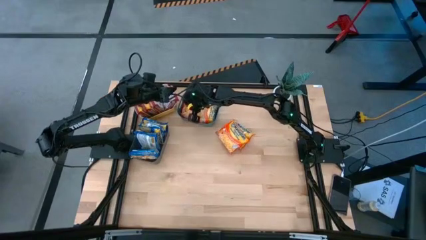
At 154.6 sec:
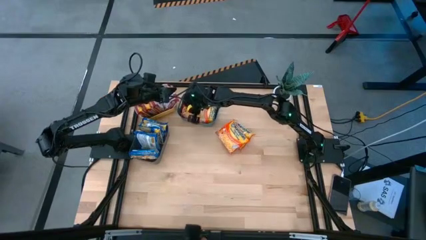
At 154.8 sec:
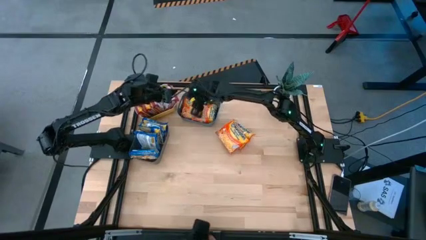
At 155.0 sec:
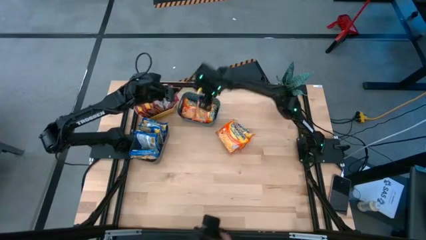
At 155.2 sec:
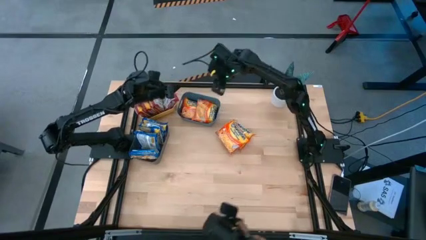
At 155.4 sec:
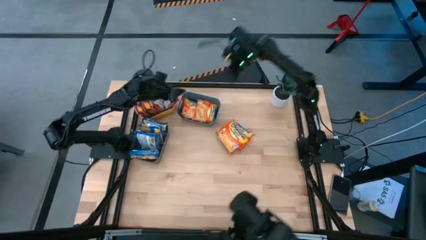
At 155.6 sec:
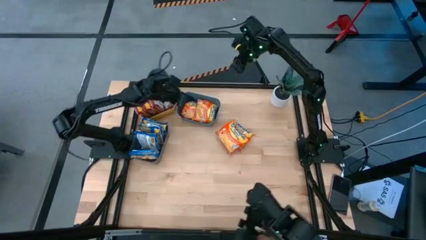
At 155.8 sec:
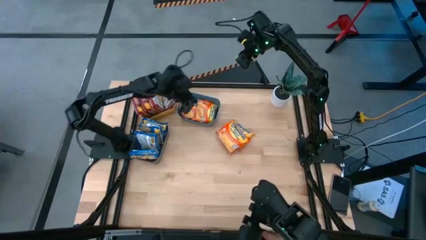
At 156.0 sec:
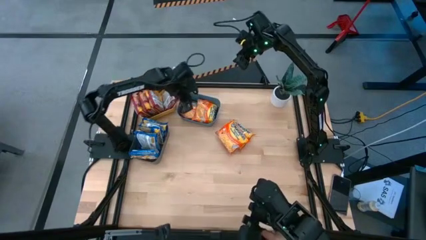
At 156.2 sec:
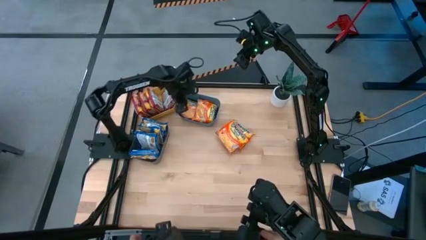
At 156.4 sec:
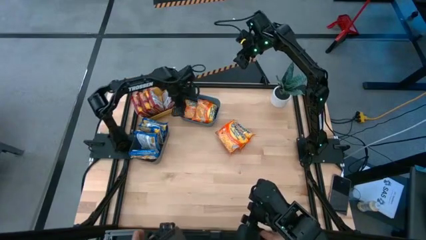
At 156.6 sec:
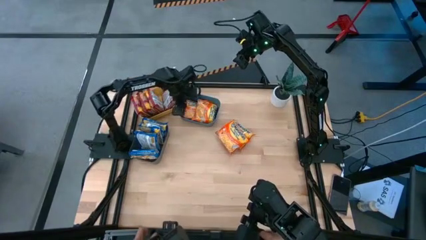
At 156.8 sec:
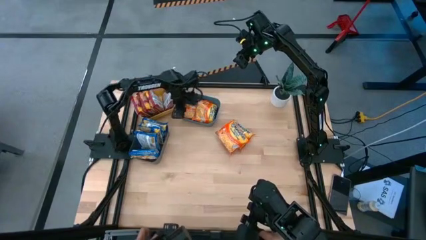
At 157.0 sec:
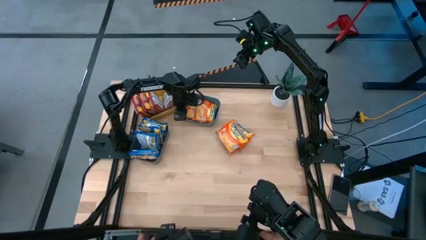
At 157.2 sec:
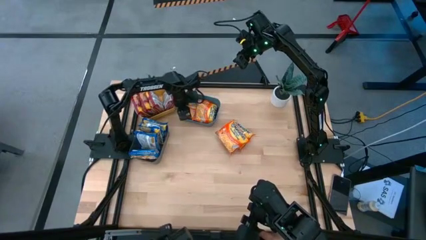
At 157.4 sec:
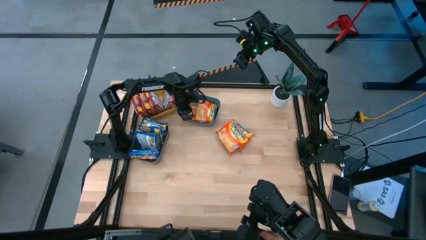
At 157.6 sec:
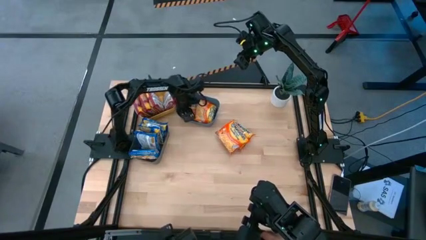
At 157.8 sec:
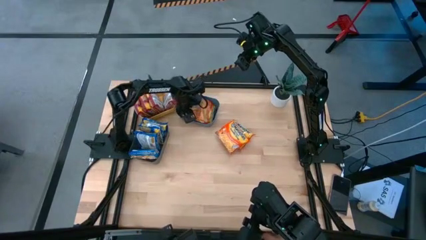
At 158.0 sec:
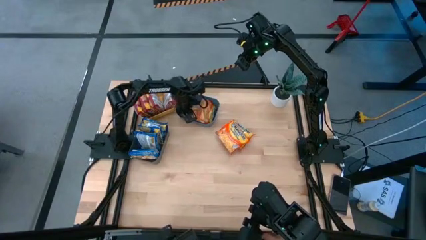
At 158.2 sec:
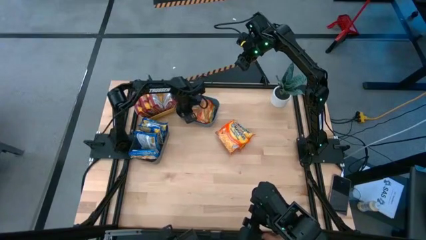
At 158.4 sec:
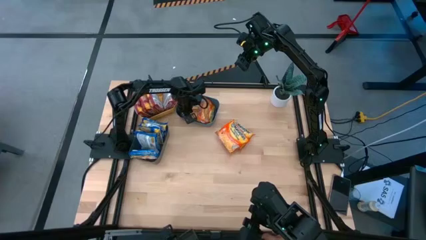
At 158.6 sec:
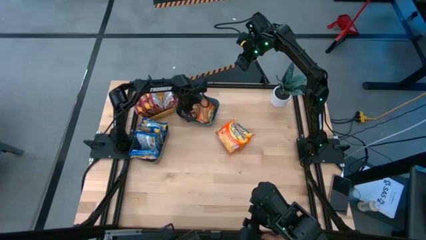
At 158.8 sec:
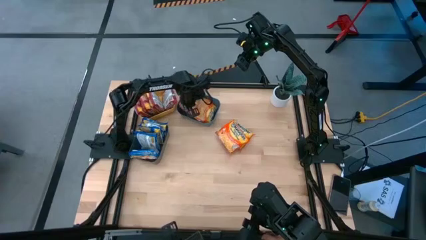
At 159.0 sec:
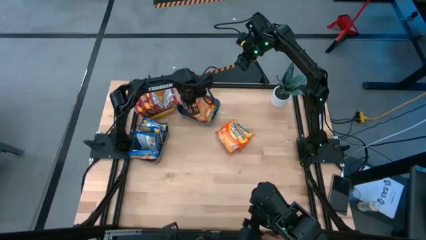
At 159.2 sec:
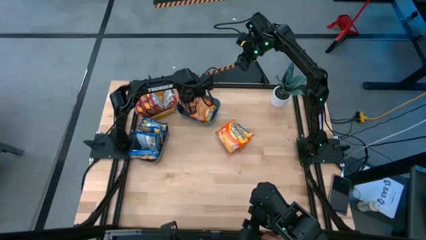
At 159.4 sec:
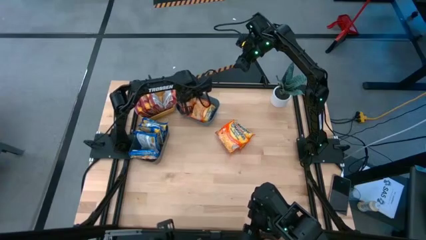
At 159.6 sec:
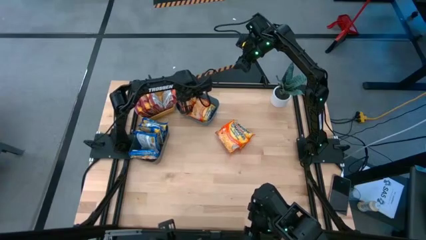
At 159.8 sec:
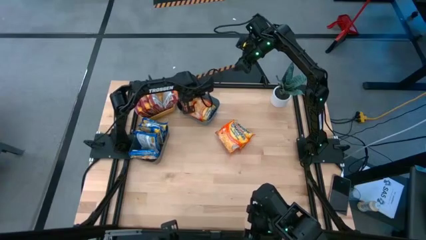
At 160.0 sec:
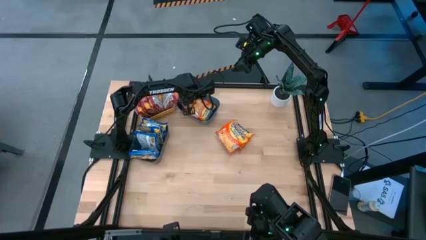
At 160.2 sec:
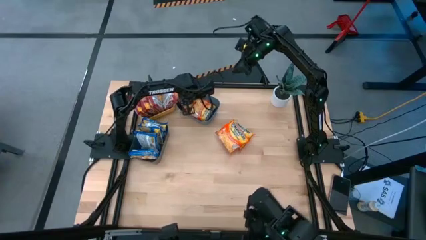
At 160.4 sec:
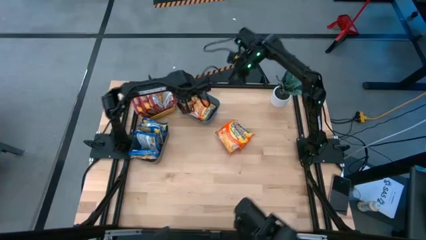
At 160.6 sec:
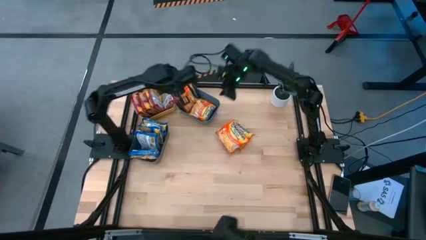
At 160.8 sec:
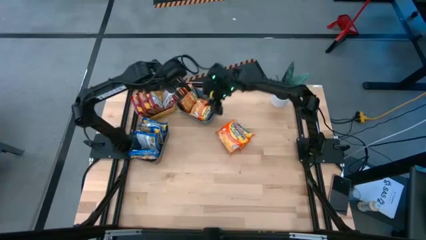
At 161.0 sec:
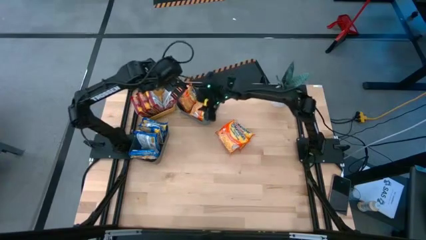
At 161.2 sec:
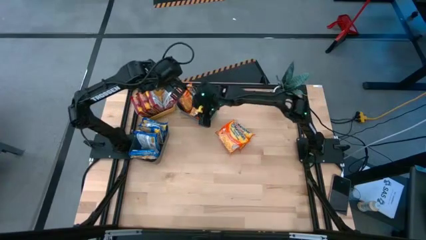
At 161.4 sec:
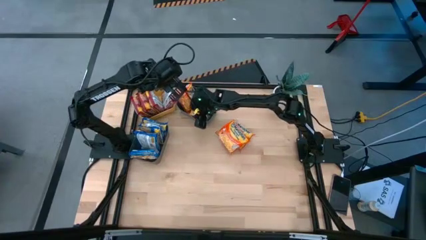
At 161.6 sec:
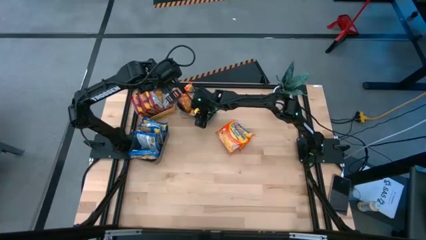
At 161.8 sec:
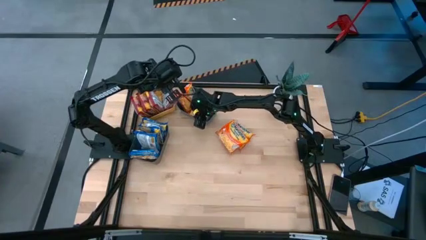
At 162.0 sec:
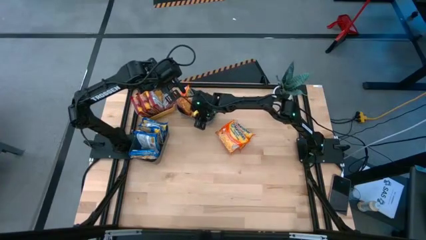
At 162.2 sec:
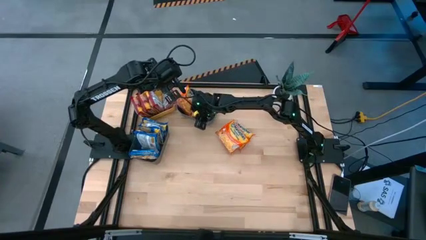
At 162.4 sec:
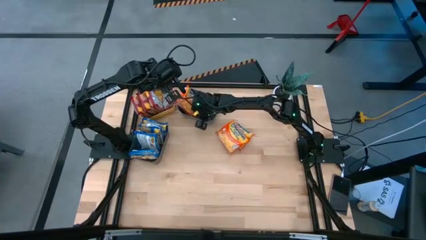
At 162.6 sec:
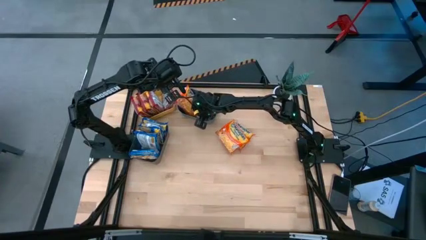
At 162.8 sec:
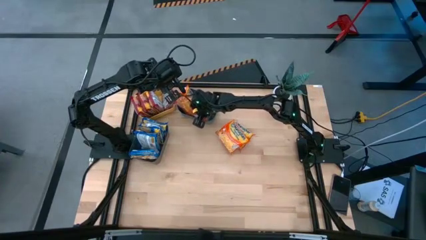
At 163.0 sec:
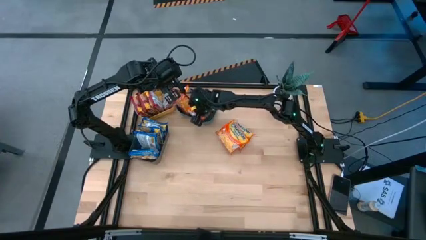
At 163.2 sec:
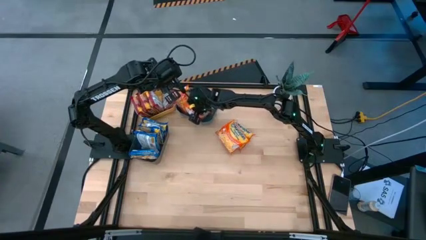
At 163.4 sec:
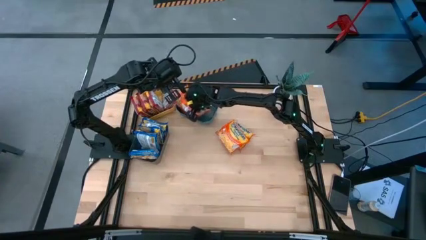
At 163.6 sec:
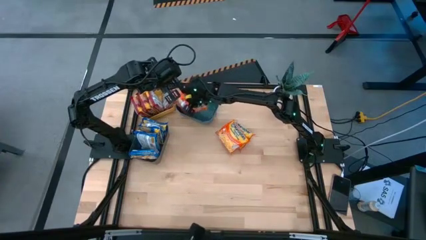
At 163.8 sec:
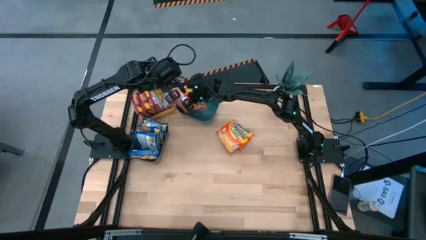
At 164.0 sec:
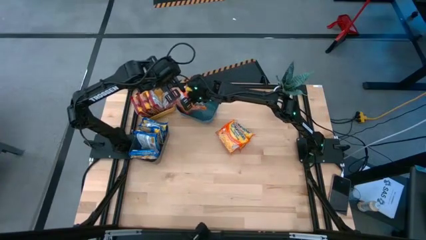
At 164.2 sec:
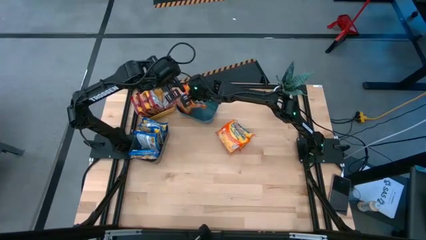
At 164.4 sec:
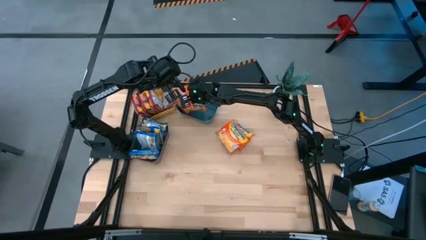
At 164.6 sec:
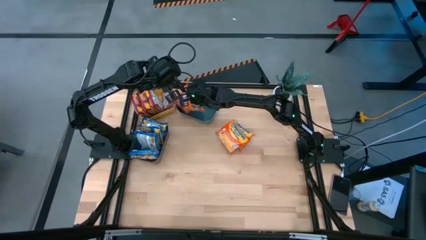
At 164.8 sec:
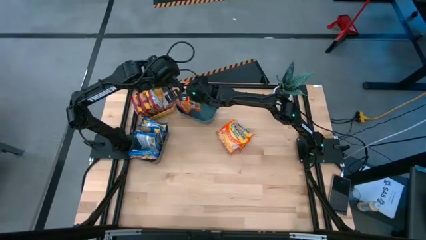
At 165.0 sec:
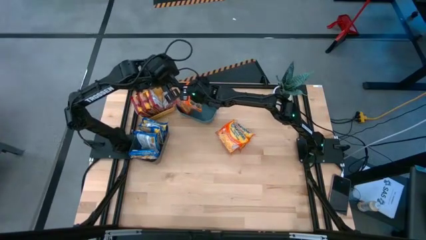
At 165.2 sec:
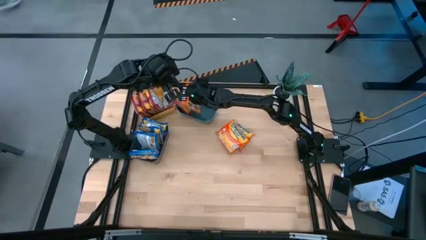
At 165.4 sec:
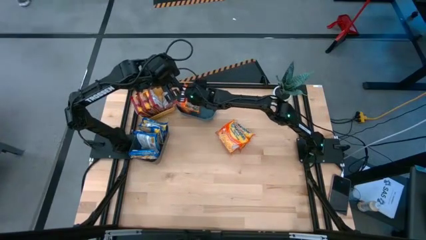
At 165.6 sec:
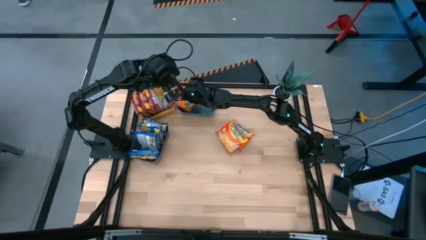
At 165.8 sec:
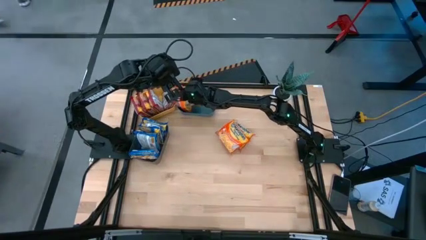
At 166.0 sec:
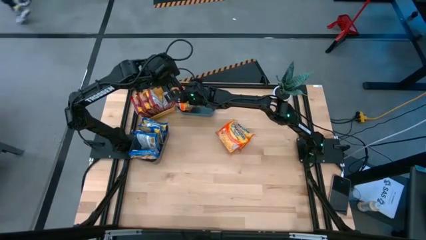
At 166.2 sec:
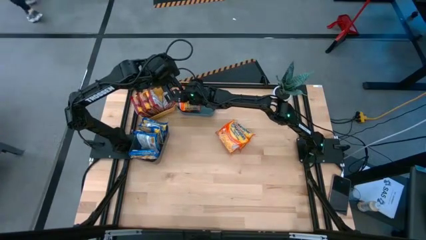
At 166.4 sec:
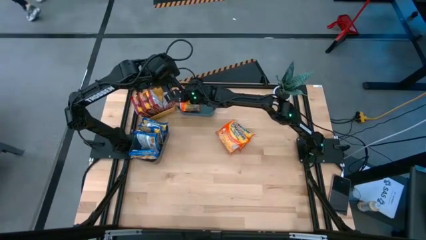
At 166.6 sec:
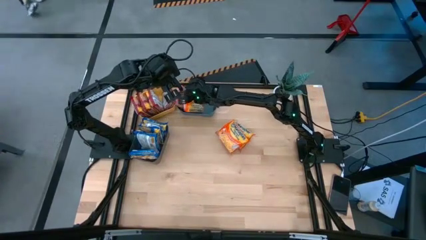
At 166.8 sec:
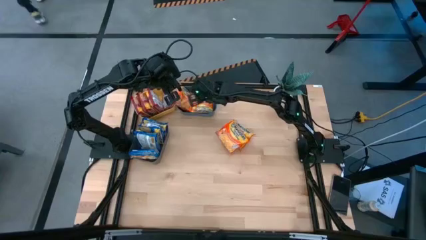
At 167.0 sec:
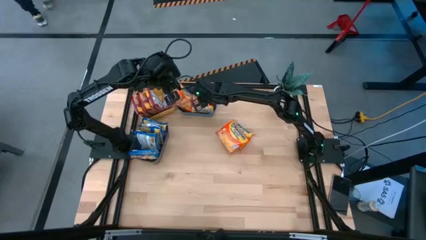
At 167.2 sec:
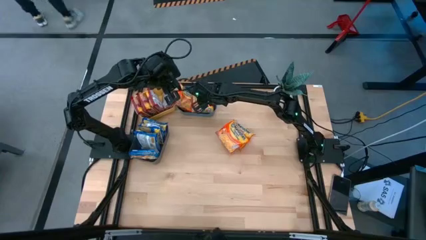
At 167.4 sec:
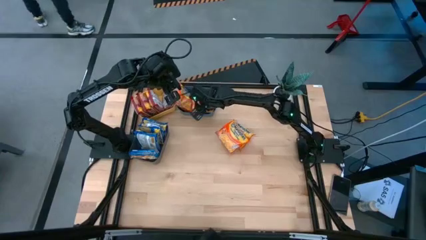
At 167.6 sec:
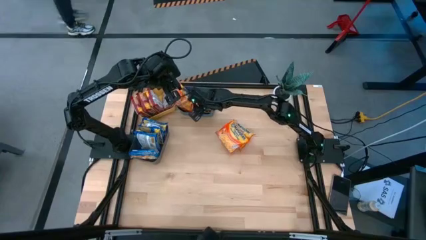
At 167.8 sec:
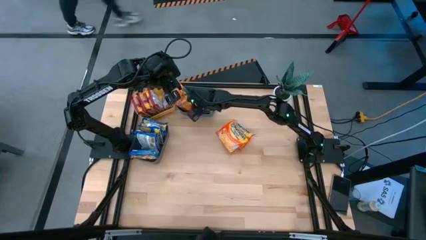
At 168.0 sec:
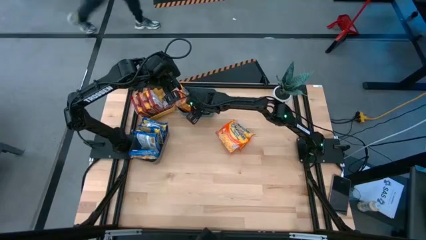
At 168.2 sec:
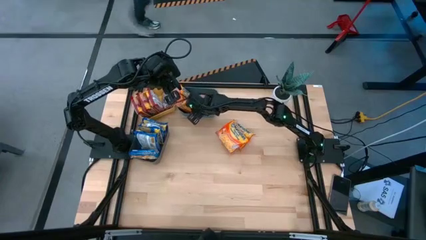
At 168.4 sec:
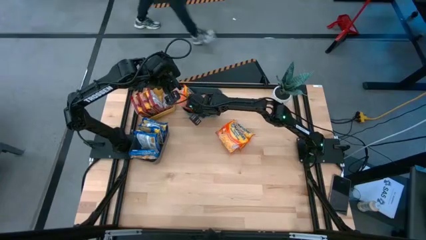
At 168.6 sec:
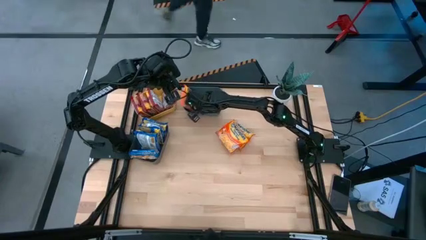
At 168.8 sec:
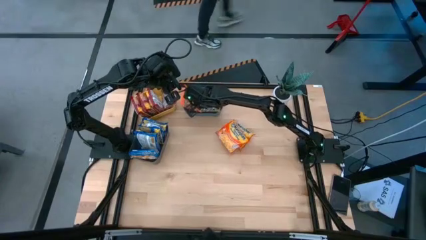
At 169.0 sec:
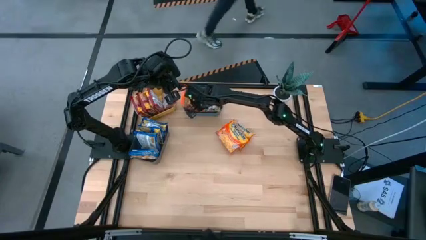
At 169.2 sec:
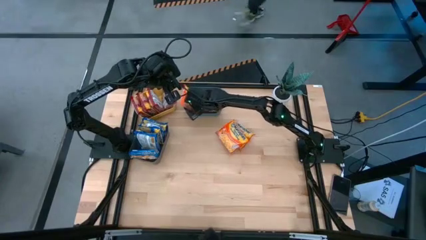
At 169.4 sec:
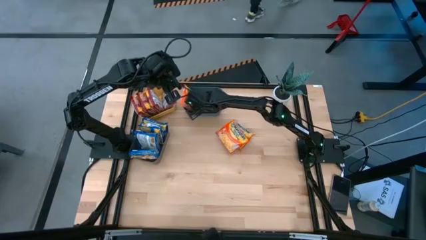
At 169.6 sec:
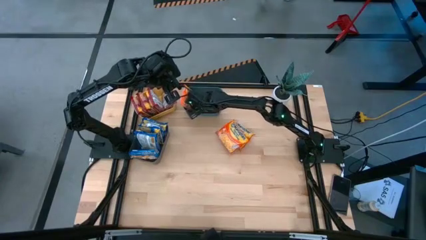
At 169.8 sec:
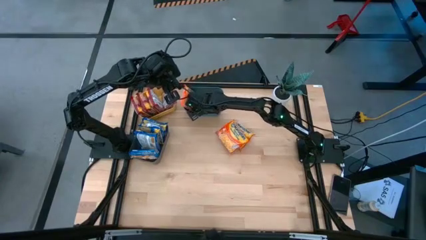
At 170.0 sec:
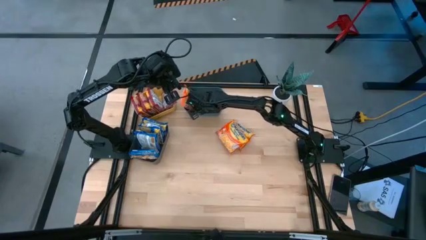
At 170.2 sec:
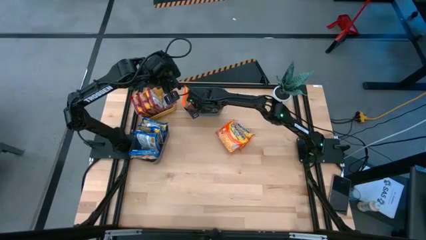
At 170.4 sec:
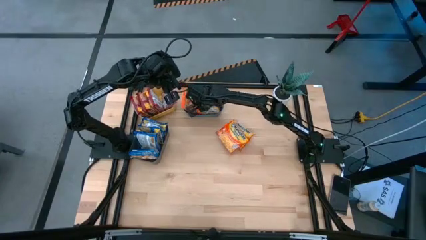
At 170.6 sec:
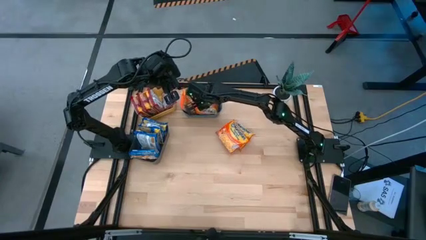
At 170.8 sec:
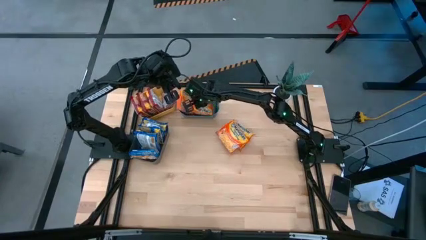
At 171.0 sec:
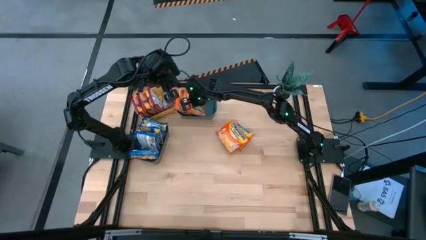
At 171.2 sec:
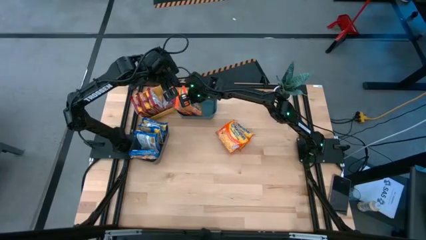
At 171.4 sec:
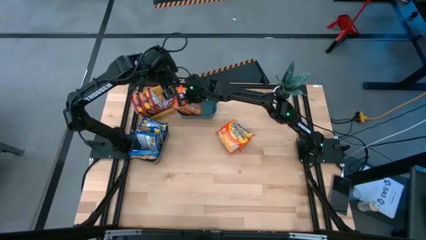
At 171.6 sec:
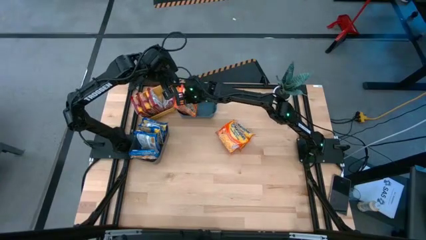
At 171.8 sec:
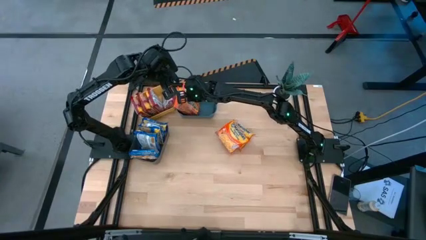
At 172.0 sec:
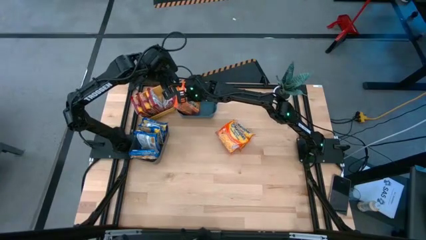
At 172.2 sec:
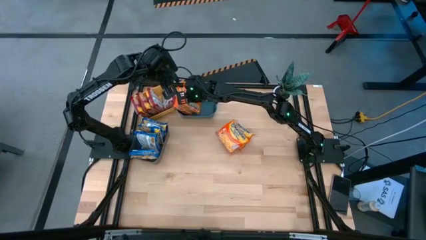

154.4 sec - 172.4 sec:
Task: Sort Maruchan noodles
Put the orange noodle pack into the blue bin
